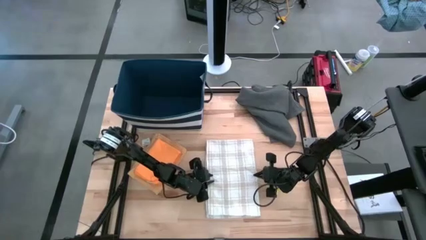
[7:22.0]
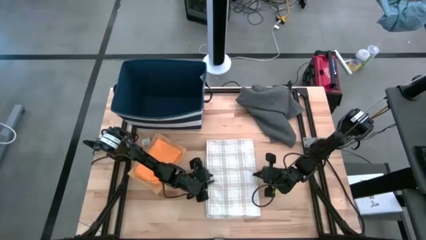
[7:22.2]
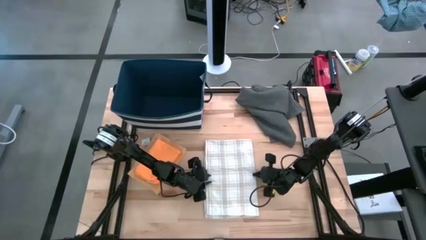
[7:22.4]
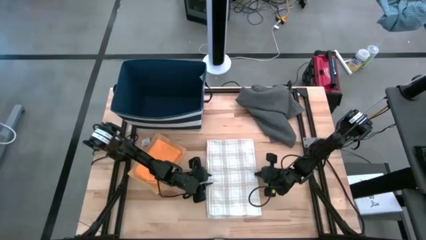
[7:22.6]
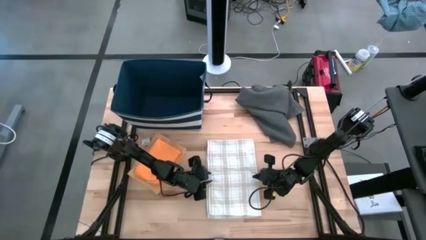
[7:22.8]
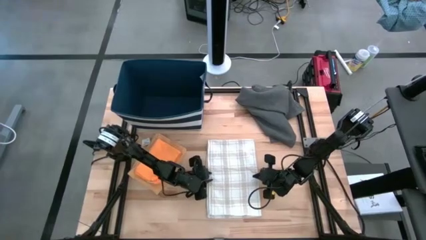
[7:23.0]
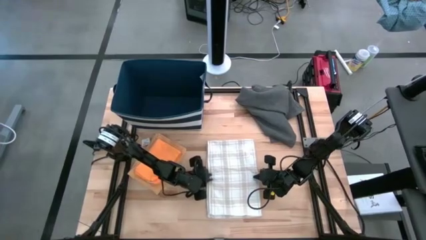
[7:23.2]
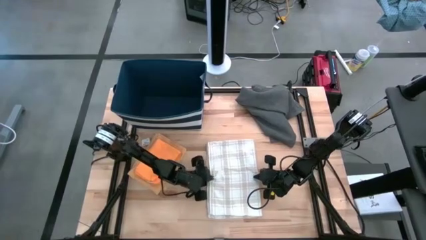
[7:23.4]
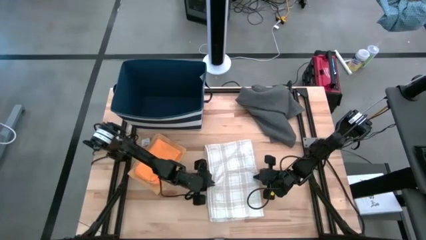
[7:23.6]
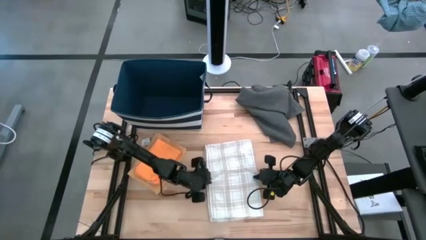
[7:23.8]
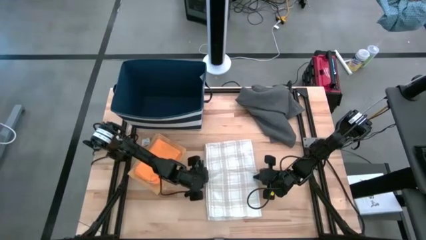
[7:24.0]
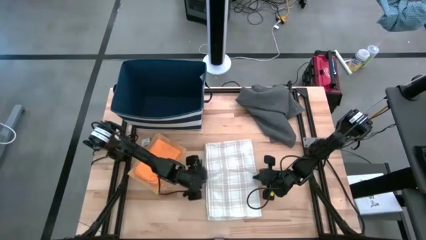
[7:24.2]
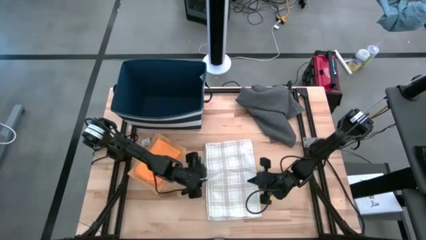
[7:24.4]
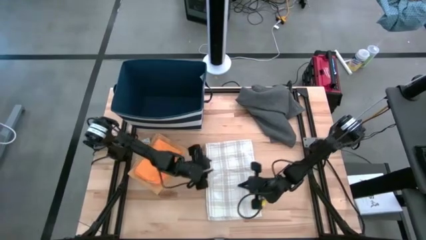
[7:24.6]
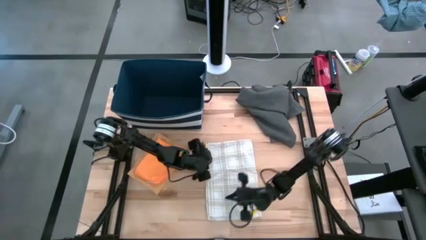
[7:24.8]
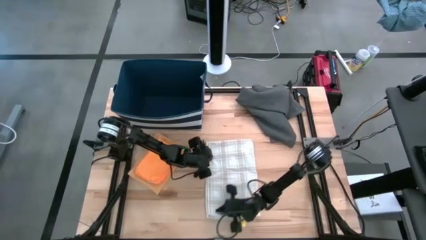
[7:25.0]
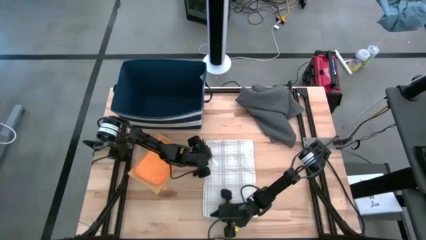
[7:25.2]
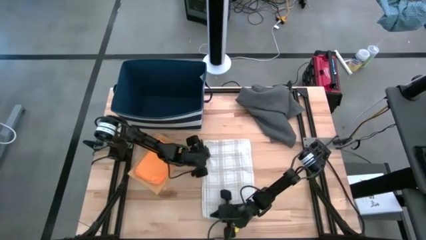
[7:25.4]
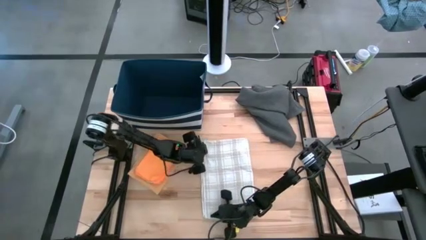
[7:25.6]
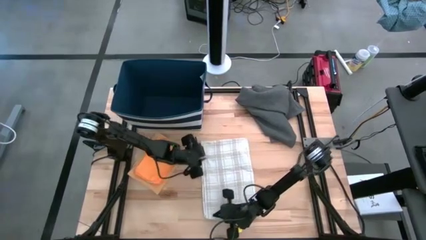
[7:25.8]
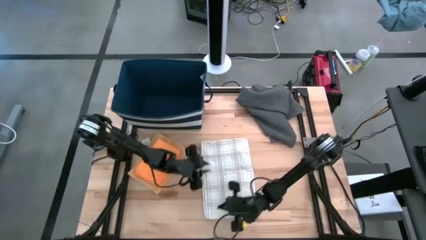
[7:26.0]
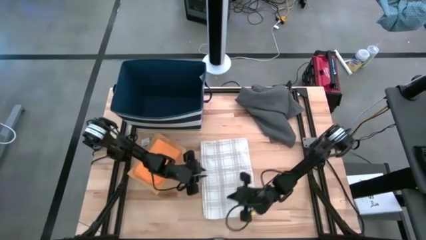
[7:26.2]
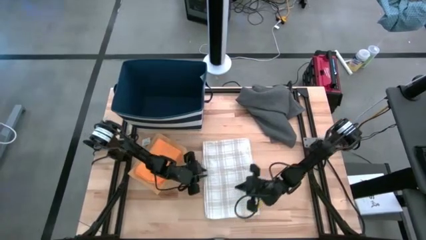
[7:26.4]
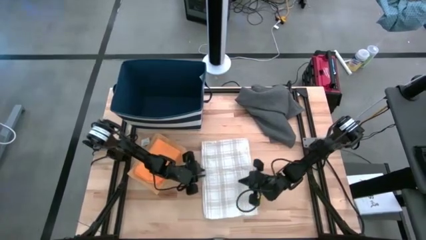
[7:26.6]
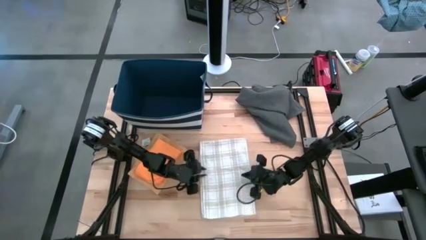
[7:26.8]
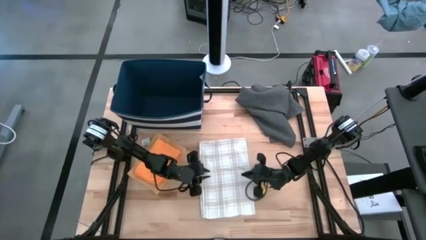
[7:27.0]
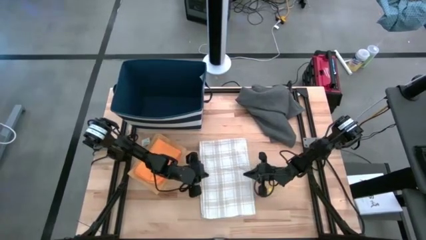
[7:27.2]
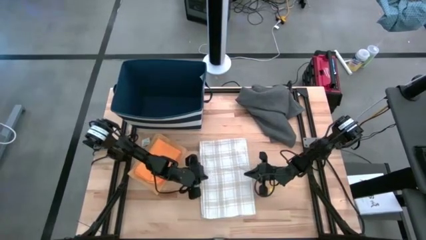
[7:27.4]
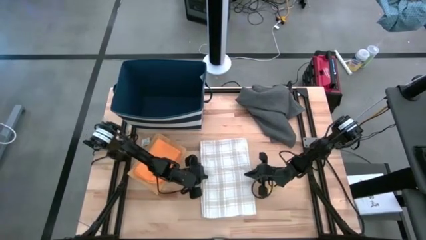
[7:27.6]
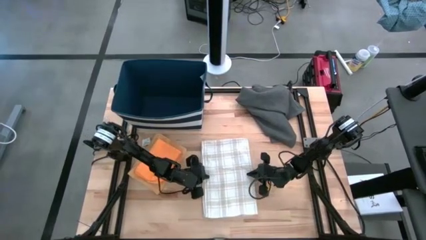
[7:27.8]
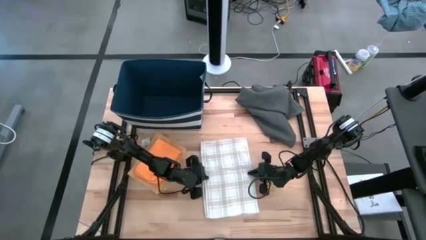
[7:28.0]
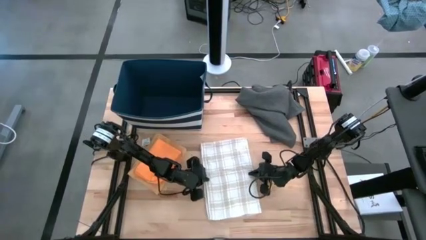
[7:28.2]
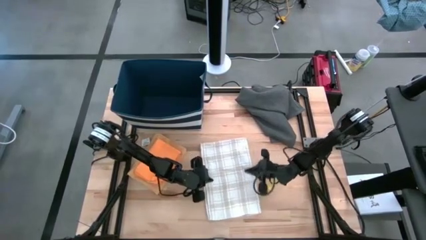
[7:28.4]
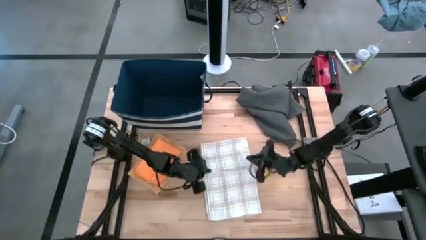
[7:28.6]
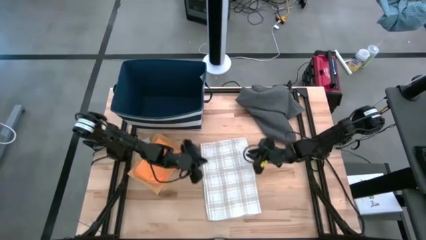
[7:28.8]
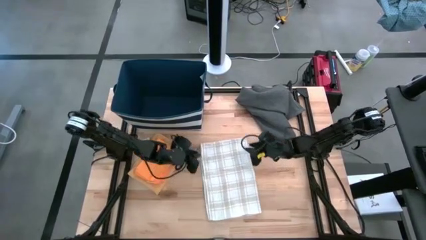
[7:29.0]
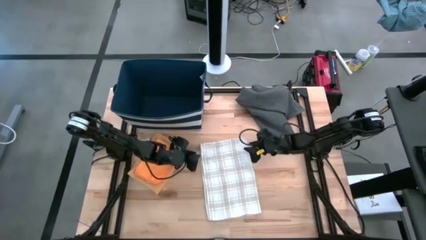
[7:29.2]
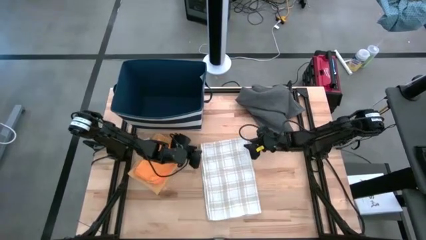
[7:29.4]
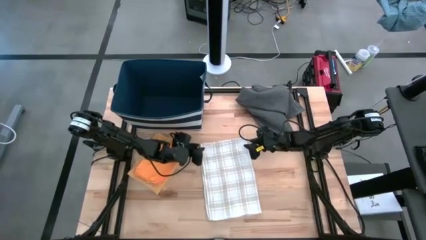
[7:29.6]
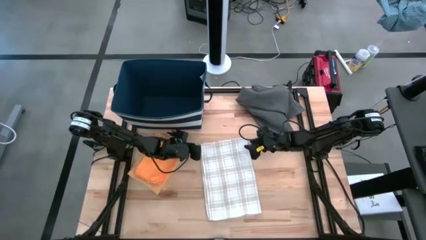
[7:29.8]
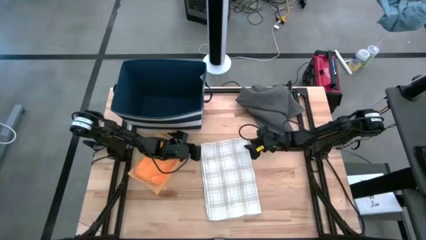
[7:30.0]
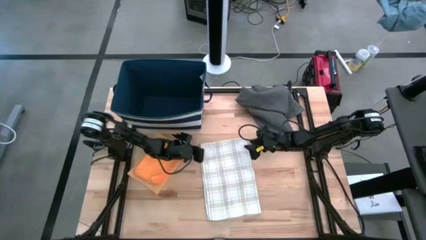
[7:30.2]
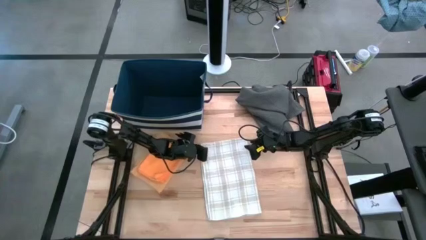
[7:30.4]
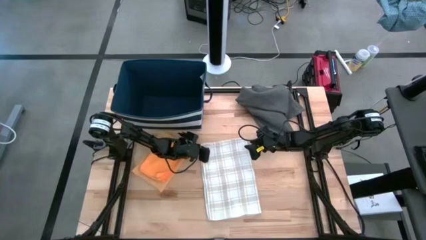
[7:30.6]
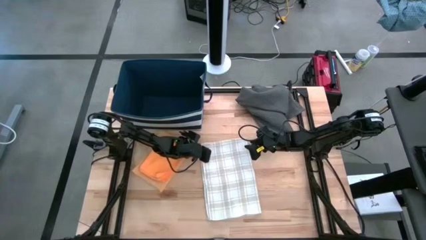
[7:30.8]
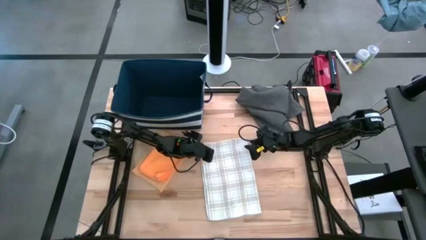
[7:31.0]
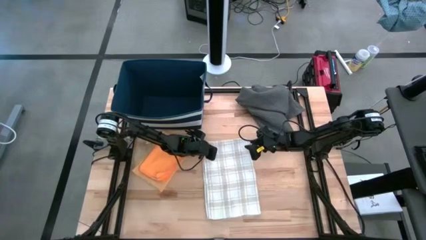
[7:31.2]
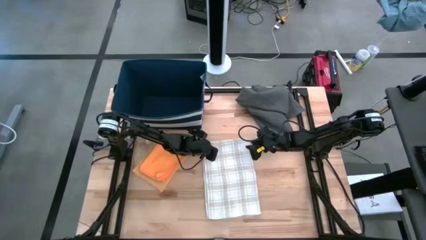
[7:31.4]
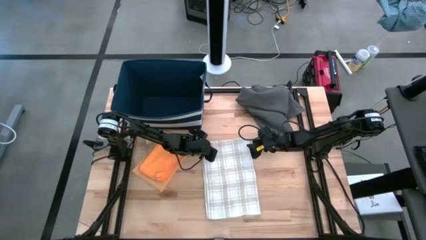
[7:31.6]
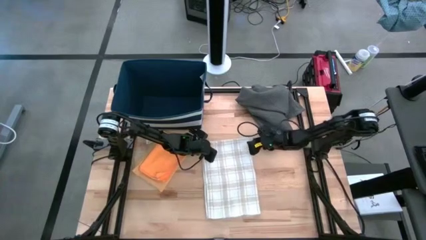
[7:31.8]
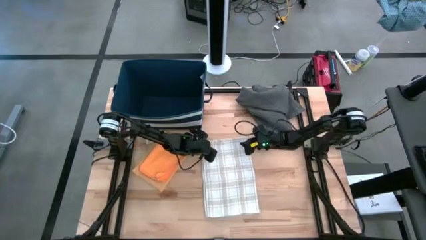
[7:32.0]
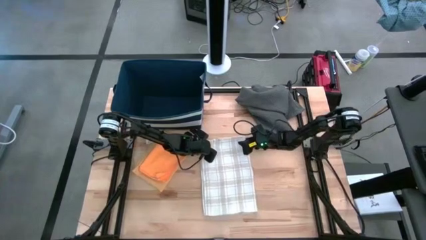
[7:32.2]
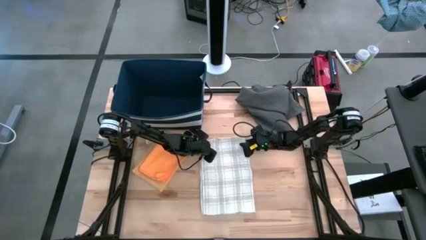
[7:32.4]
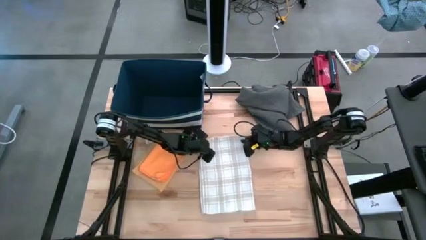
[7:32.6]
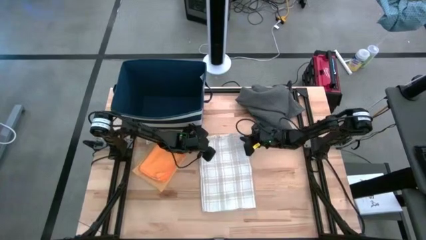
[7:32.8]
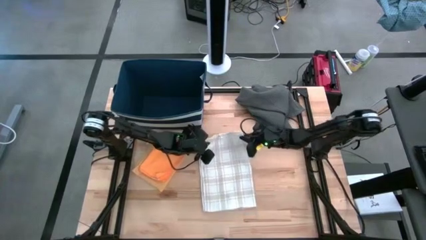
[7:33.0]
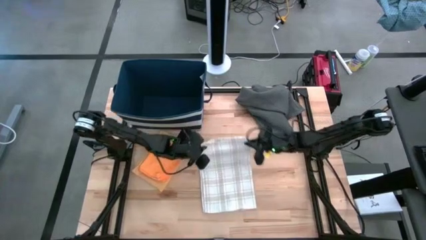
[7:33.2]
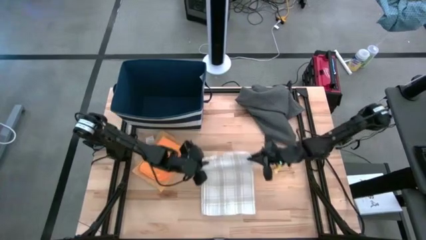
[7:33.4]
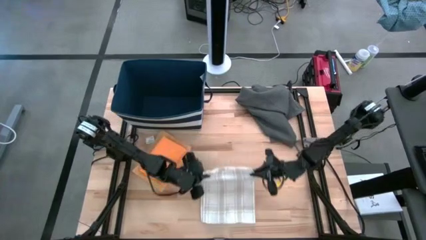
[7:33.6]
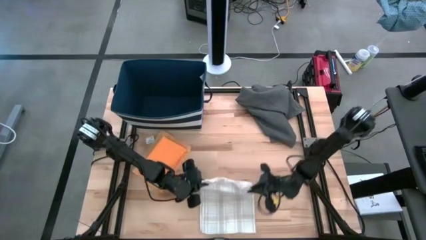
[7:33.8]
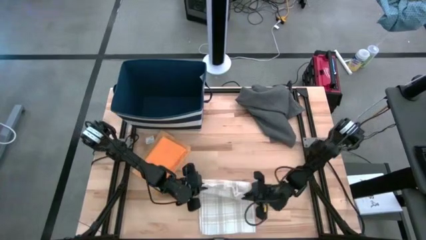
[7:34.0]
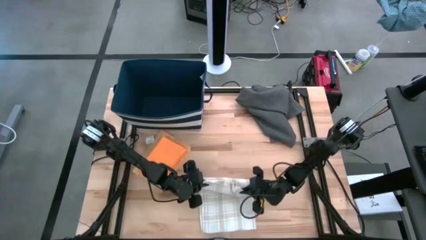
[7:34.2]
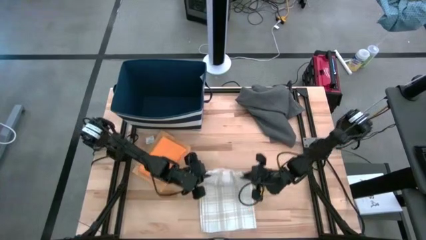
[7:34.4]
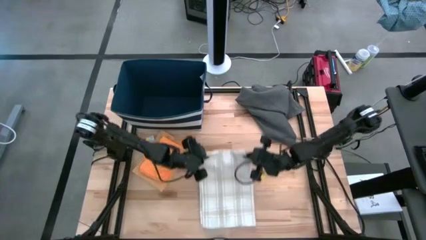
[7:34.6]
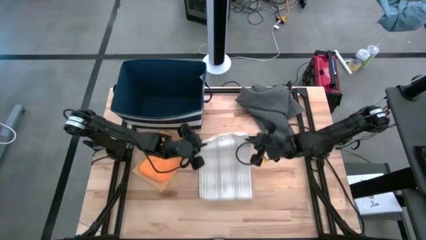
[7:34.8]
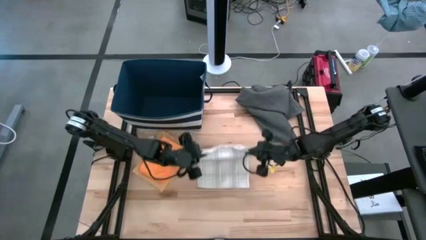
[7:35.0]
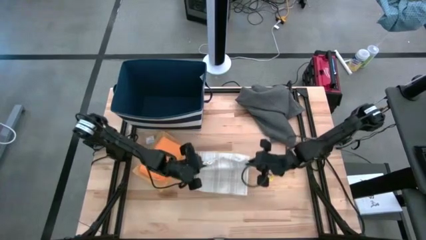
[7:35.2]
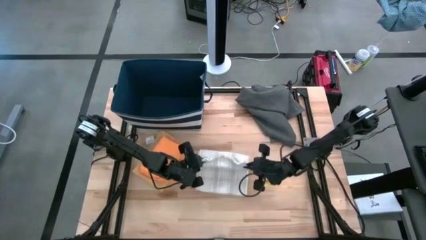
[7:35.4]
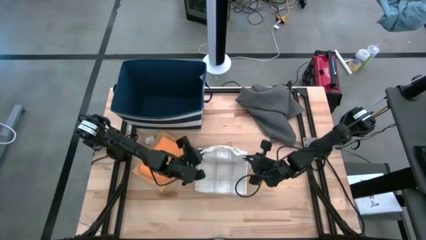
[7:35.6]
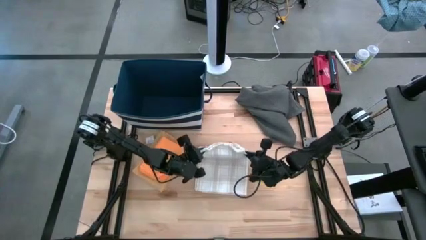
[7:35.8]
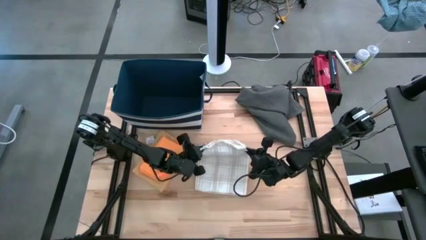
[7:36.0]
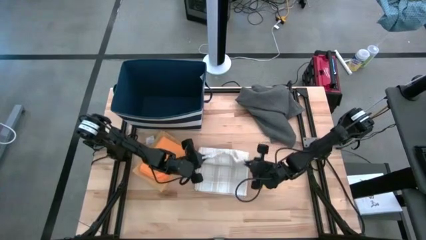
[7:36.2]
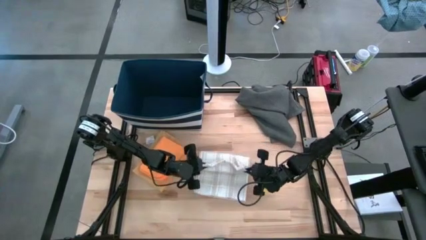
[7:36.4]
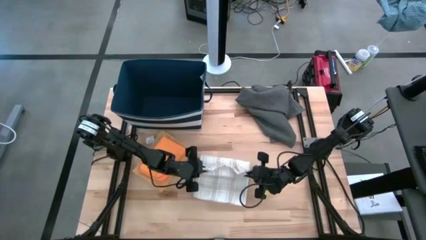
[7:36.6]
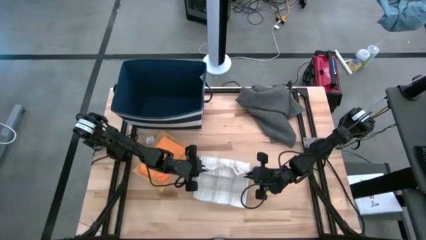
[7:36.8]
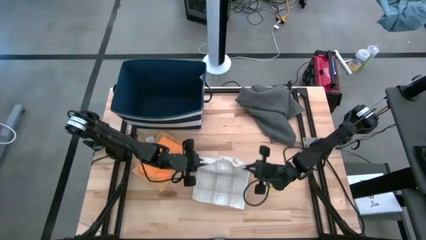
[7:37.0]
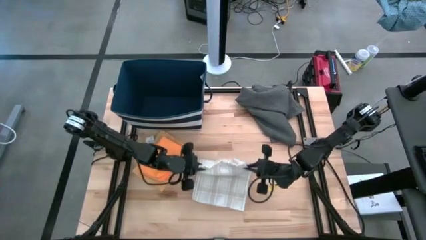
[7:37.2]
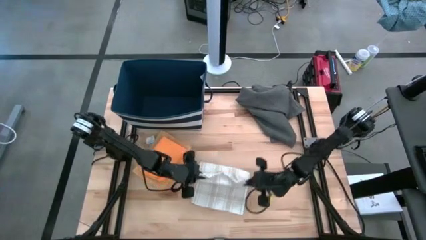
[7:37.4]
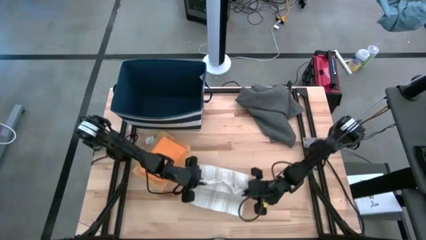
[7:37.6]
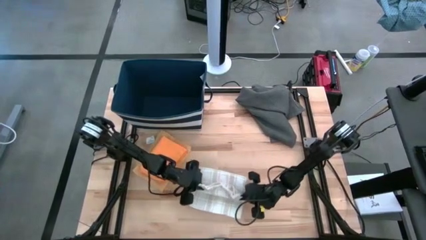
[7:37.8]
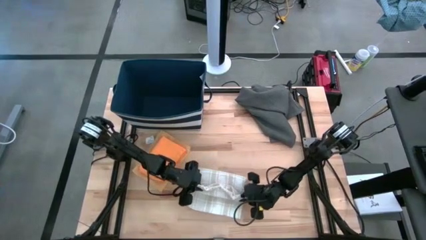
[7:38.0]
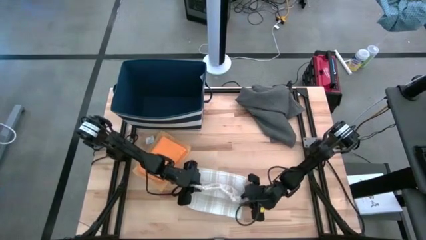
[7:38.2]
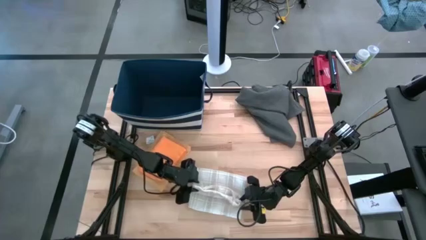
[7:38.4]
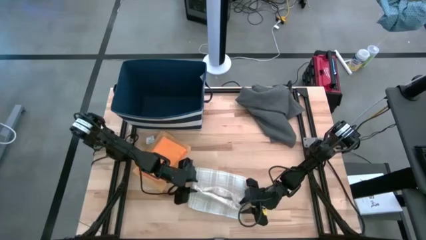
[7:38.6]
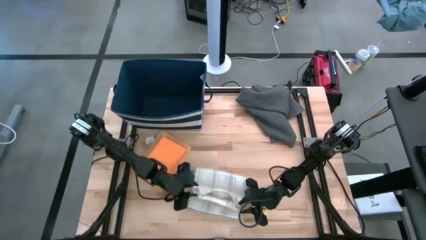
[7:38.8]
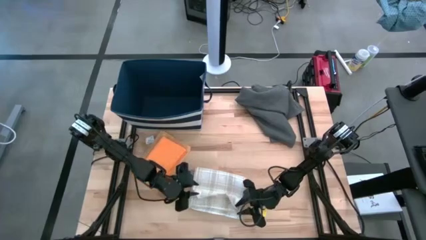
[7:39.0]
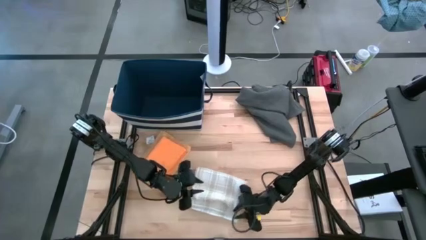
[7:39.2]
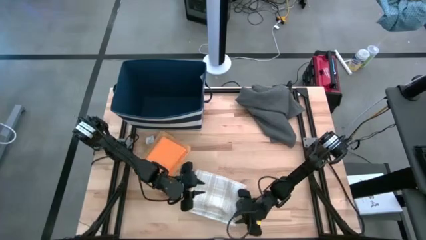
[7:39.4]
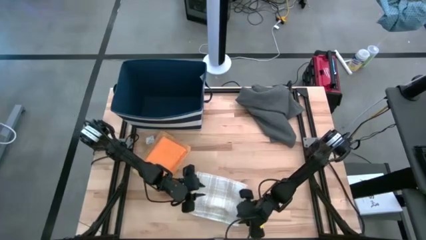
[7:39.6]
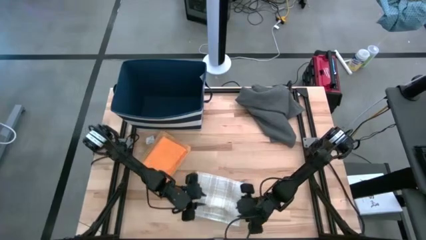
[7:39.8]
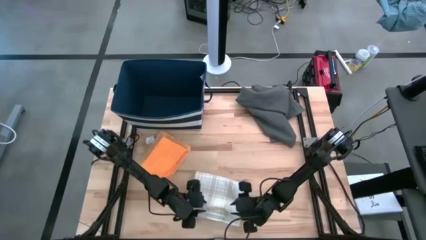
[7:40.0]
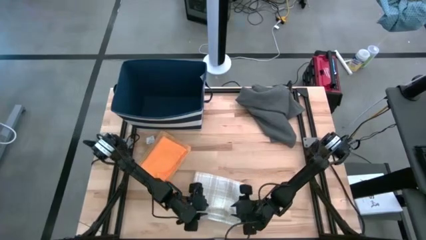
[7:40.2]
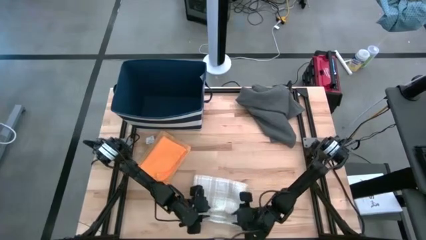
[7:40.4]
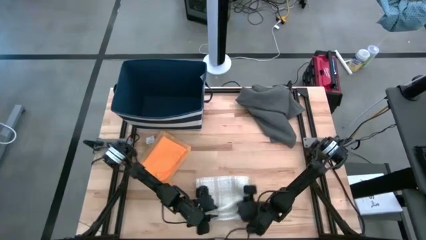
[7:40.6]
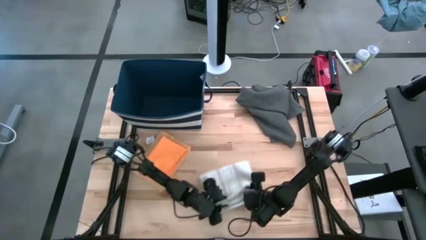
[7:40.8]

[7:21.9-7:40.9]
Task: Fold towel
Fold the white patterned kitchen towel
